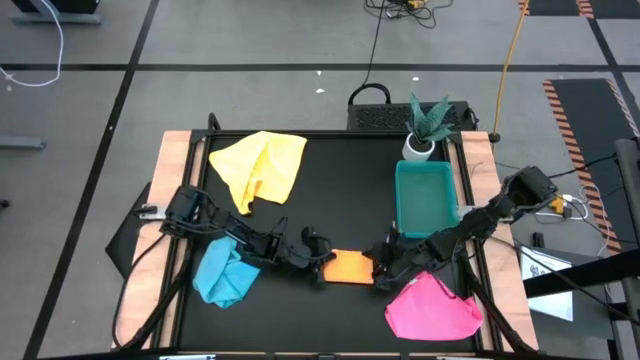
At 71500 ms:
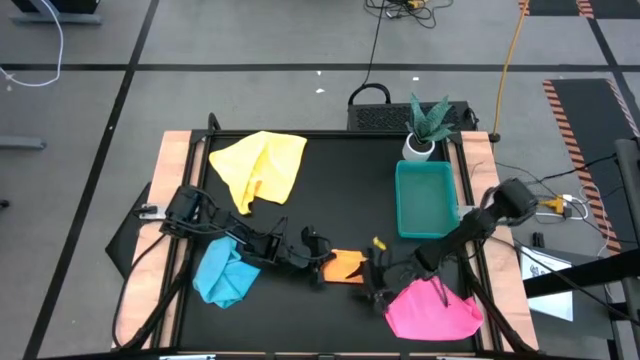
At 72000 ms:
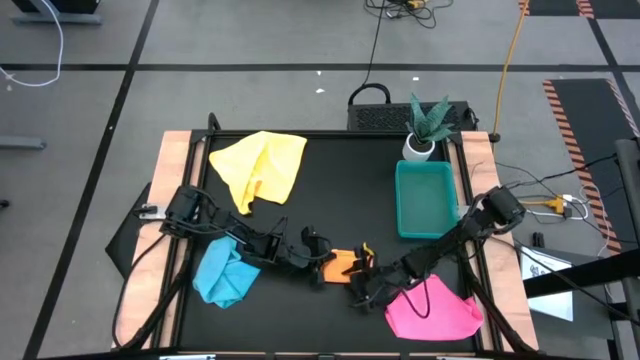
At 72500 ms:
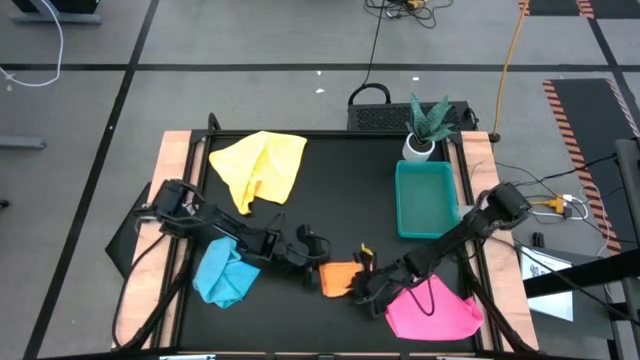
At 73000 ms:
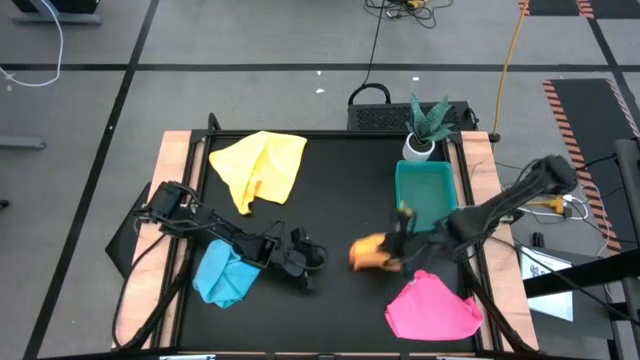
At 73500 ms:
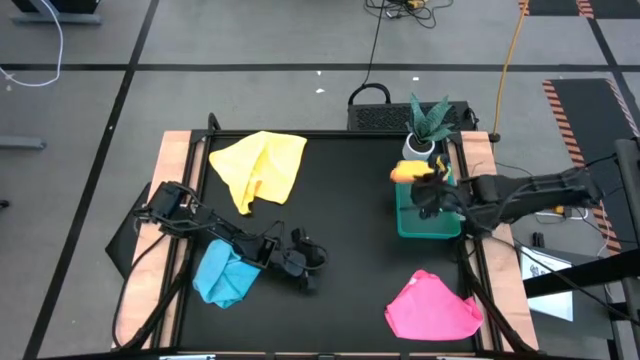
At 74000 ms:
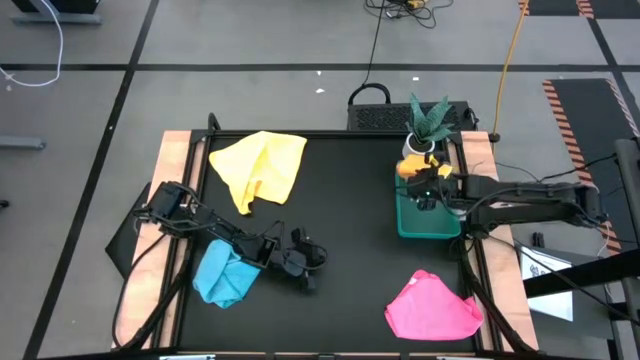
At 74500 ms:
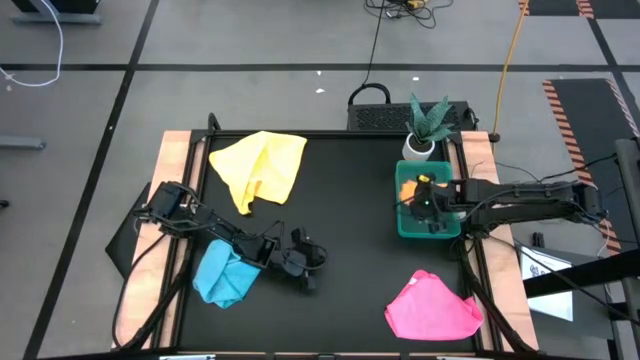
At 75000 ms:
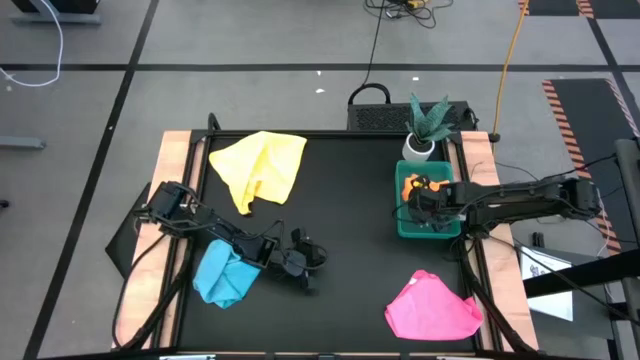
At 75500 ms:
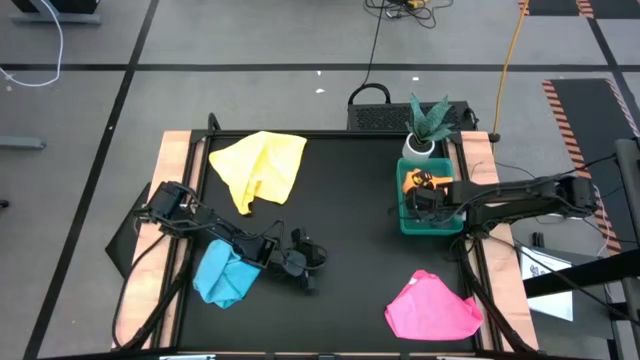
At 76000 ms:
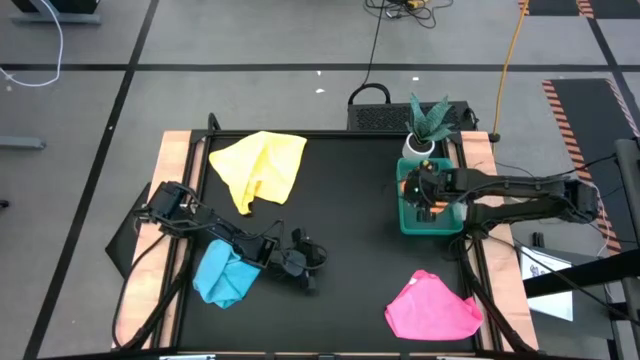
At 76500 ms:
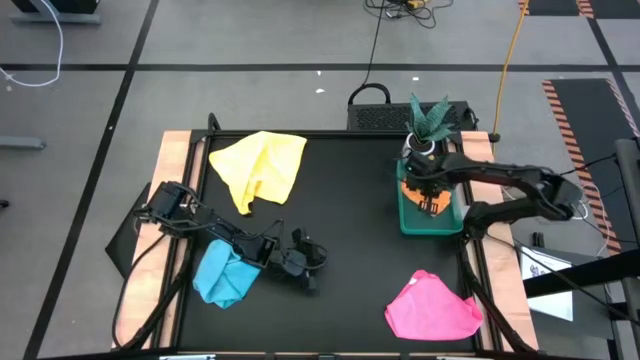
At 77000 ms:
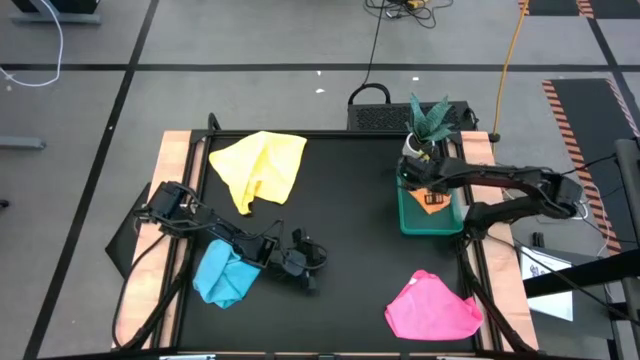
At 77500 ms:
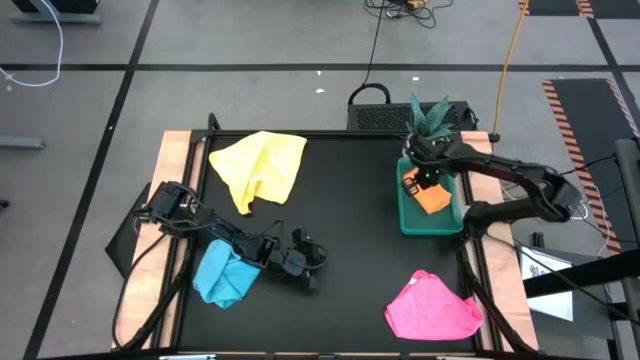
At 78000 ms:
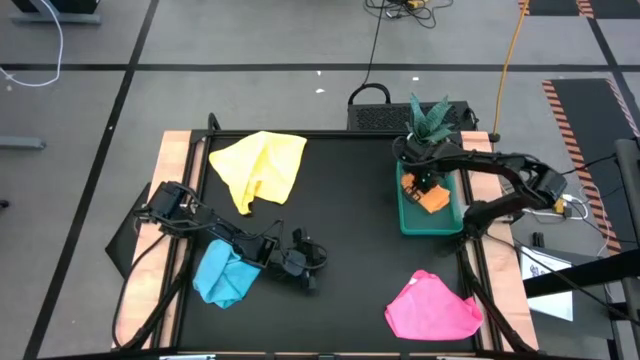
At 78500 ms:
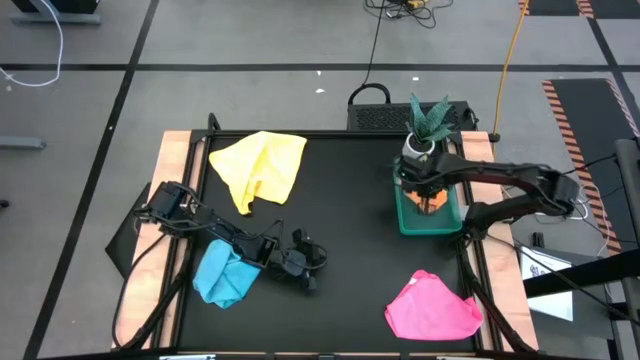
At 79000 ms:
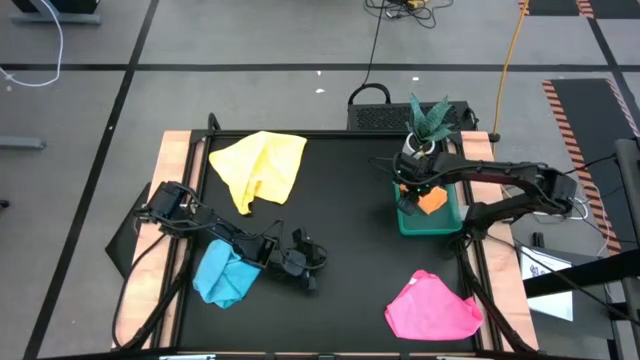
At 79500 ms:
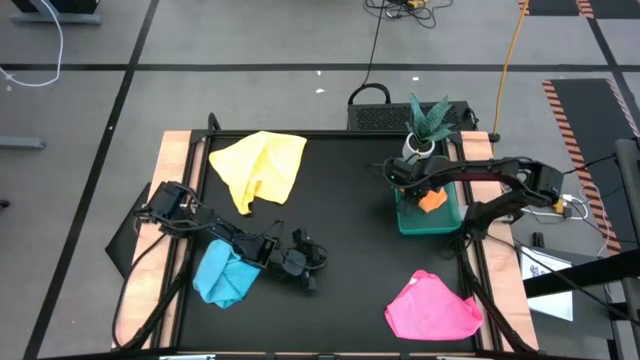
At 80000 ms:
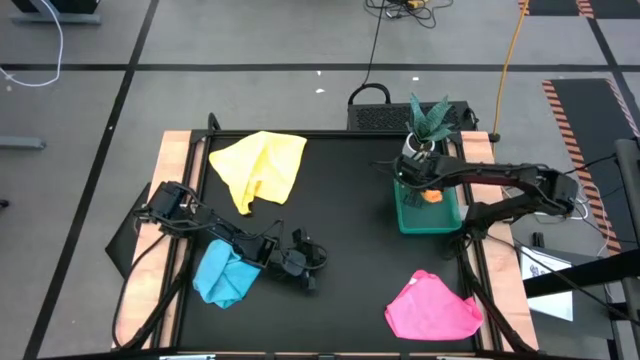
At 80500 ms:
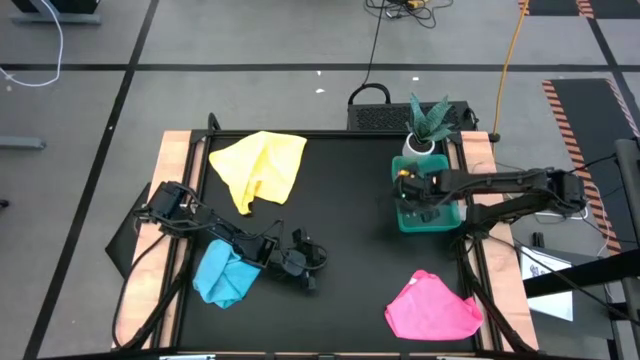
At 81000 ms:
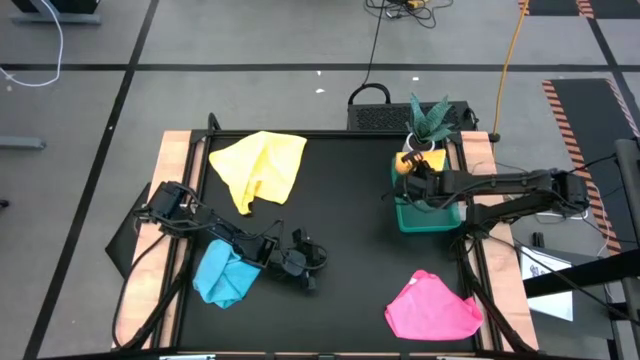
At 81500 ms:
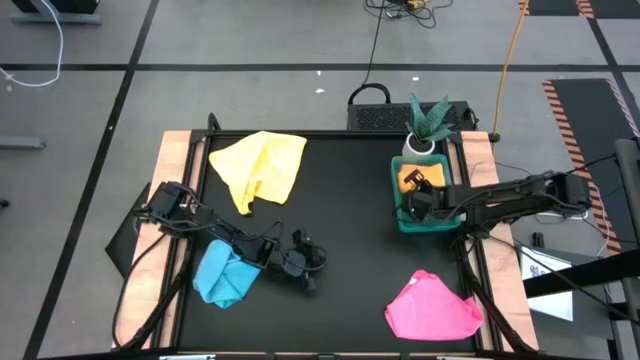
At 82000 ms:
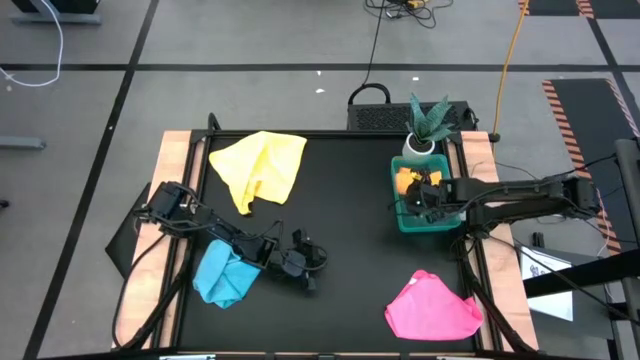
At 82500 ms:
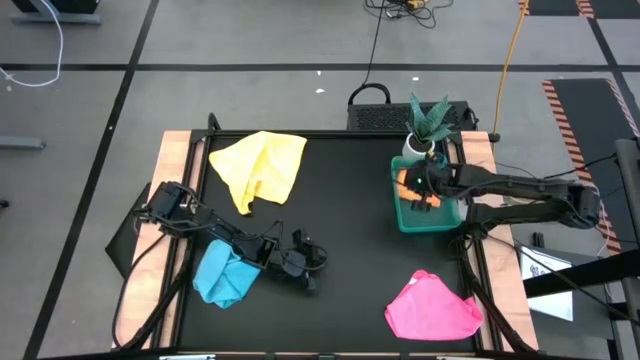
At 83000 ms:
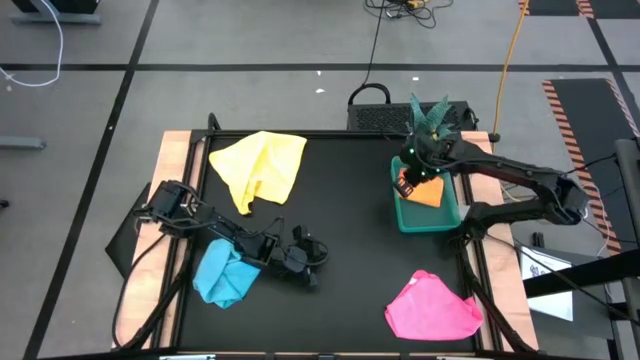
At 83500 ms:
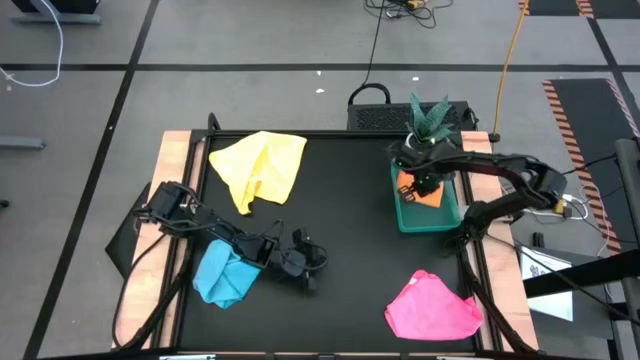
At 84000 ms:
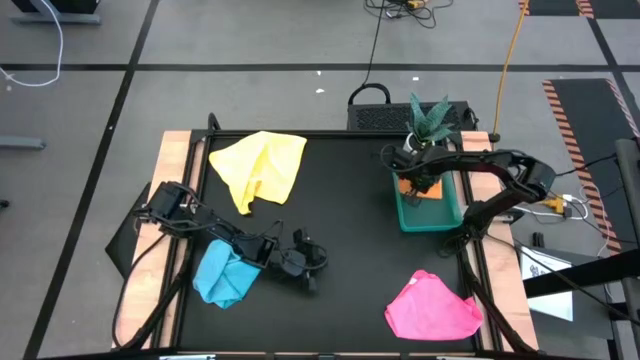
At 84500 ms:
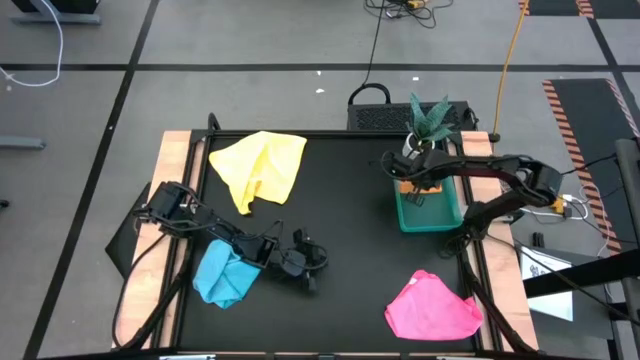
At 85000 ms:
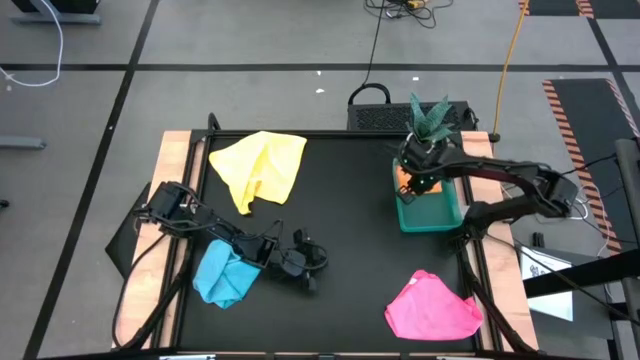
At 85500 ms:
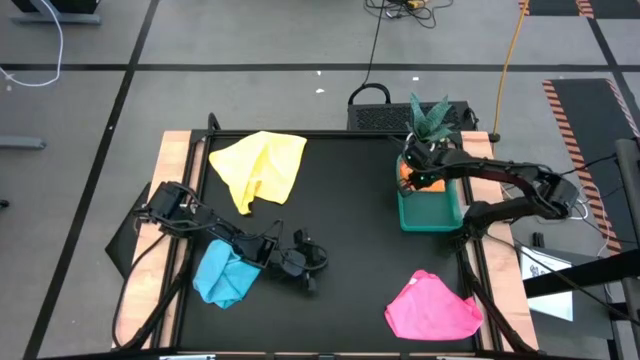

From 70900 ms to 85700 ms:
Task: Fold microfiber towels
Put the orange microfiber cloth into the green bin

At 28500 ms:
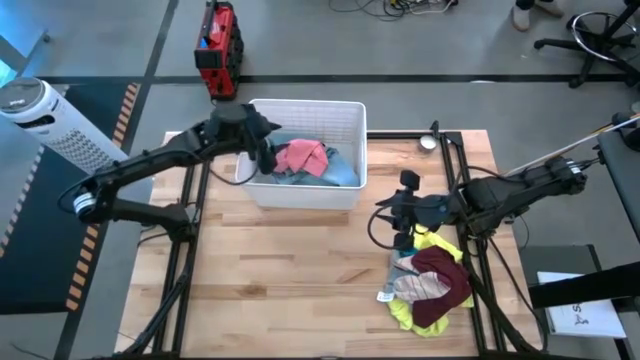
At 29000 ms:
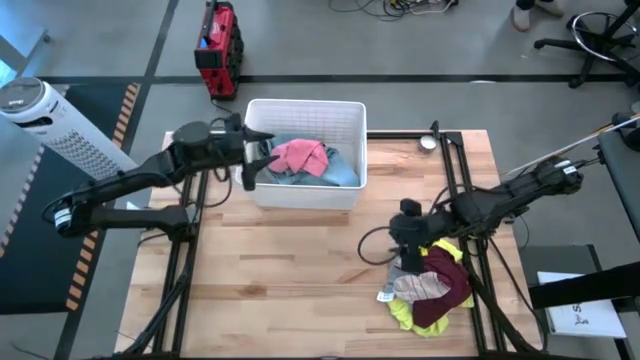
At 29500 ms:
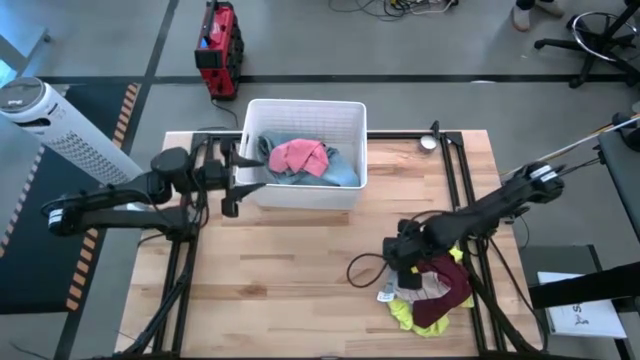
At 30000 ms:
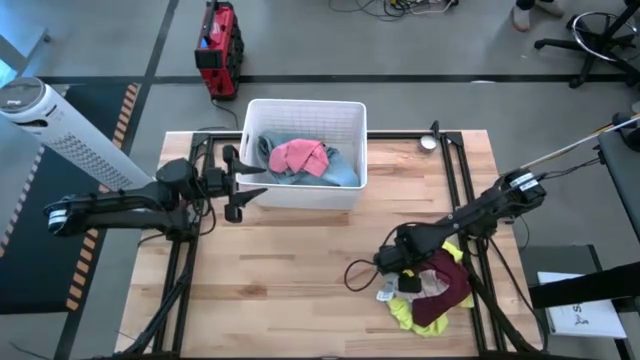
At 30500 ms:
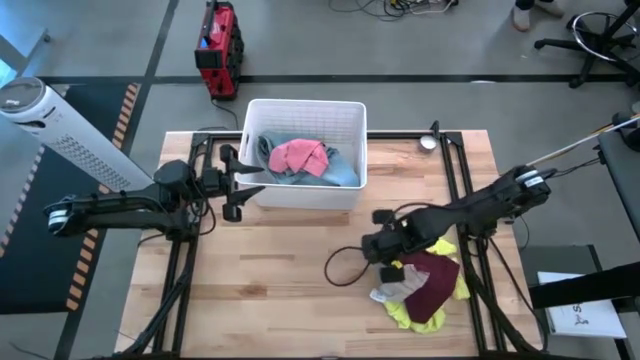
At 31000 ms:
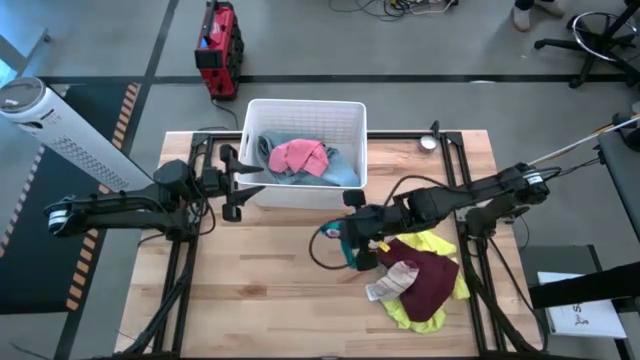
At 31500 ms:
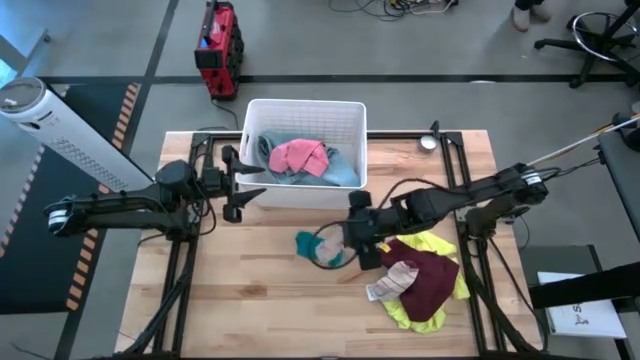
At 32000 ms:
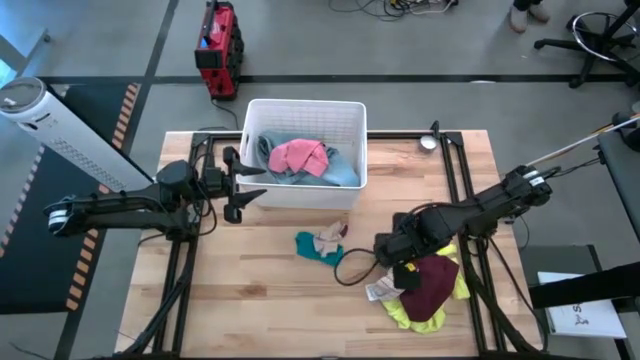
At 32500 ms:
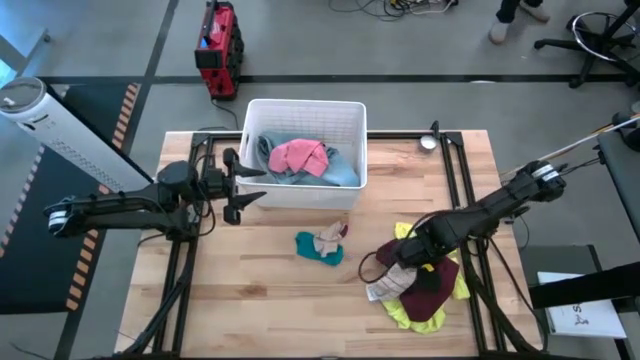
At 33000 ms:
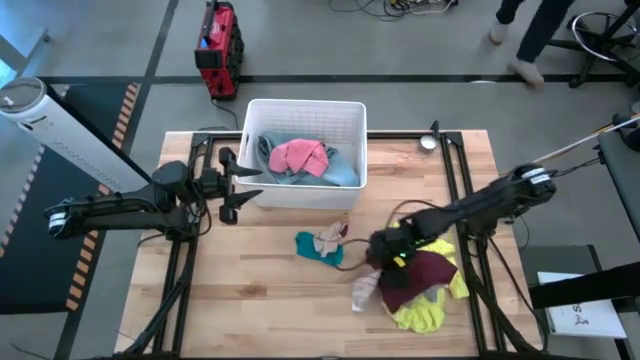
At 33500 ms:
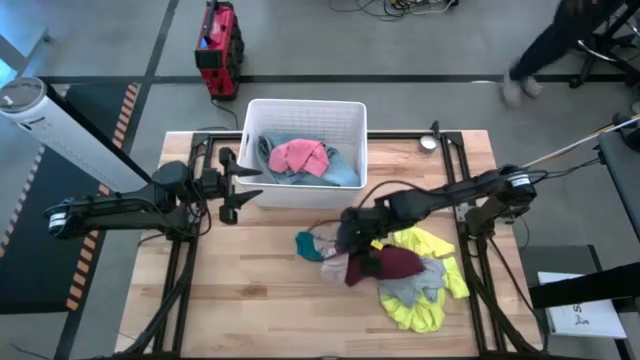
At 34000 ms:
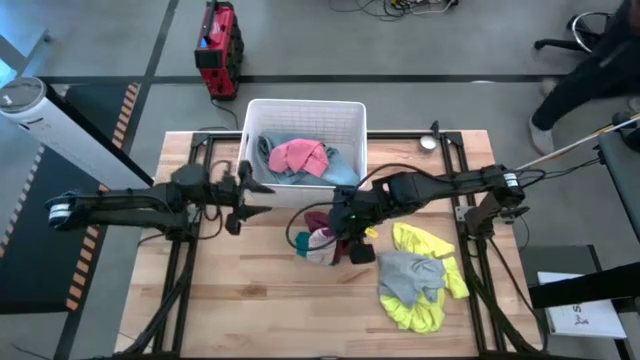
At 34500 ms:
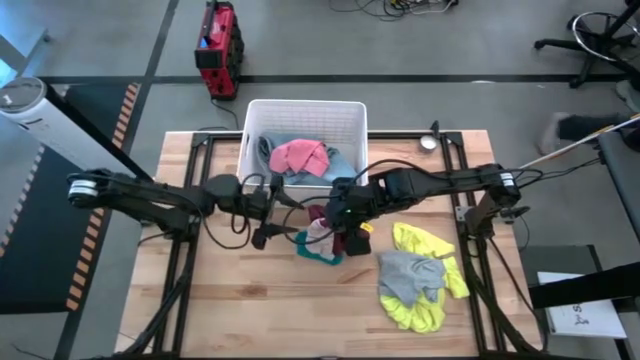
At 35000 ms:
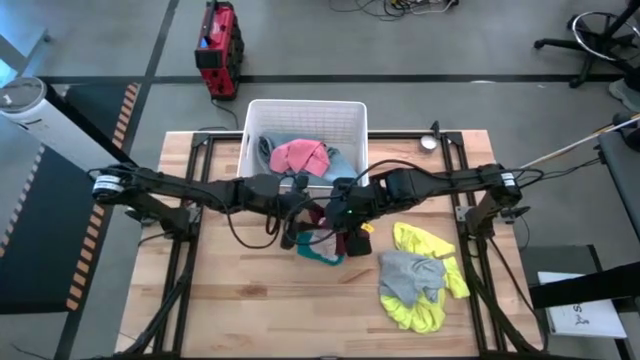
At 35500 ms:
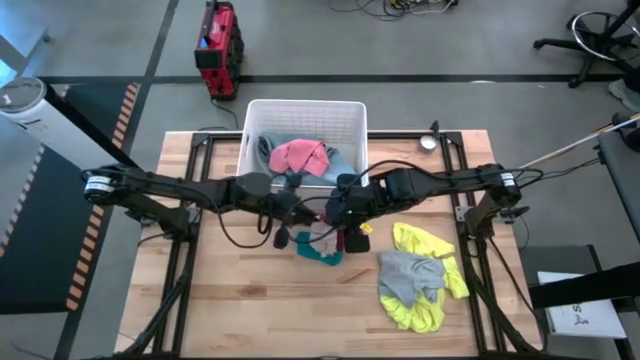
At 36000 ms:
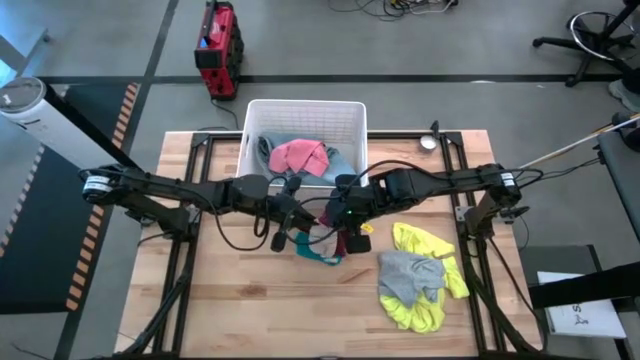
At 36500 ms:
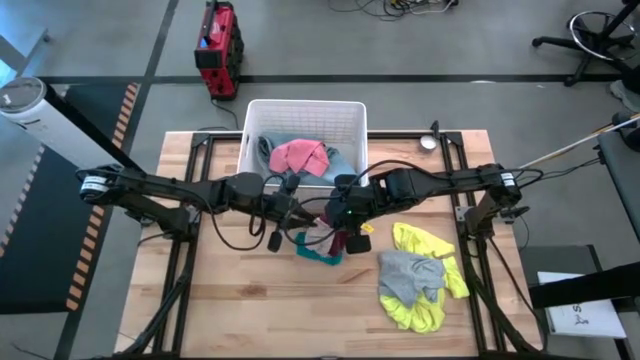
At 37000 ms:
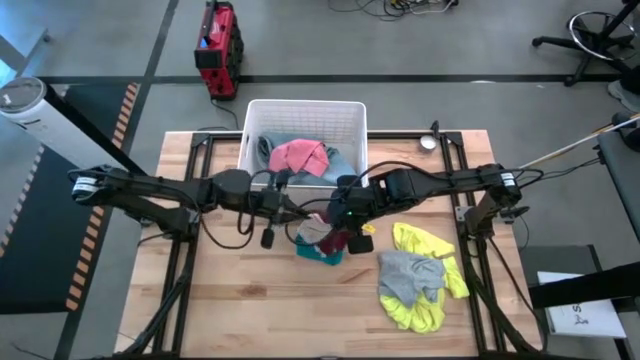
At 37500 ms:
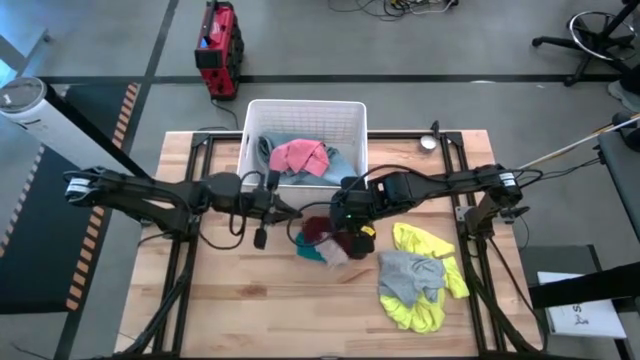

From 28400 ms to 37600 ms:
Task: Sort clothes
Move the clothes from the middle right to the center
